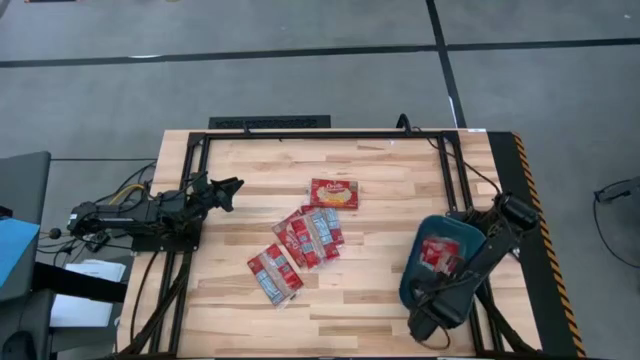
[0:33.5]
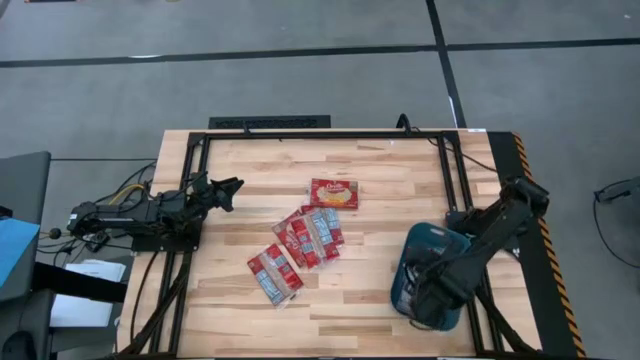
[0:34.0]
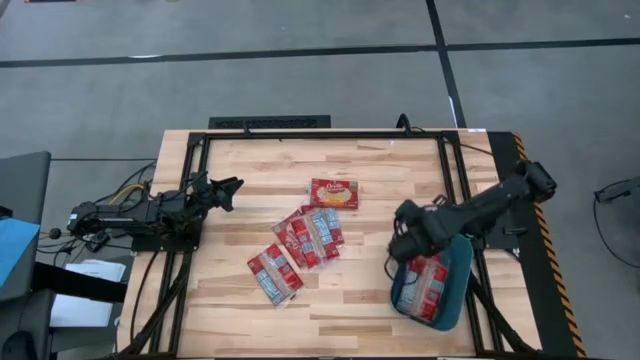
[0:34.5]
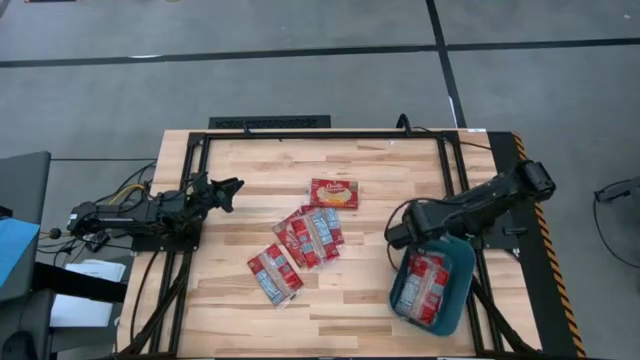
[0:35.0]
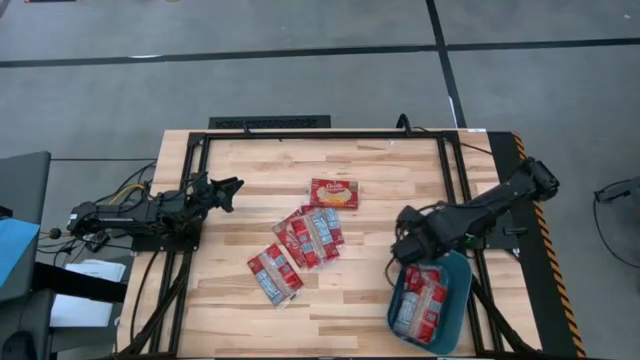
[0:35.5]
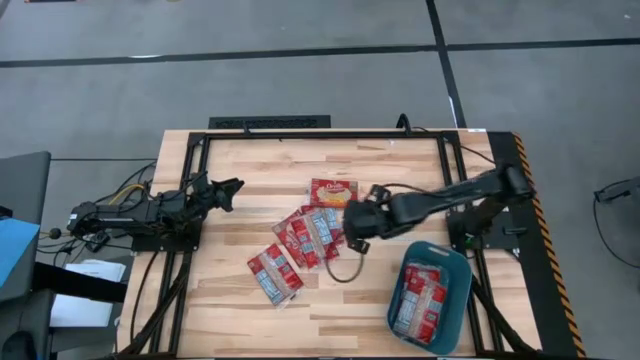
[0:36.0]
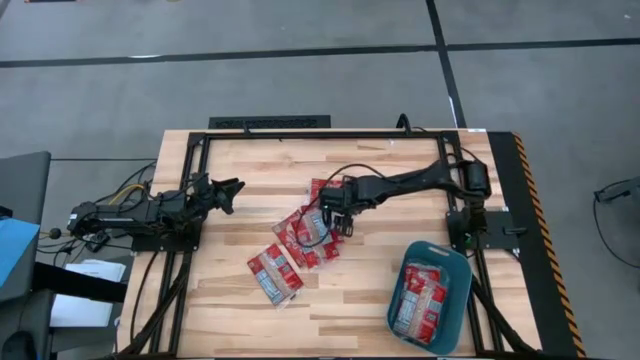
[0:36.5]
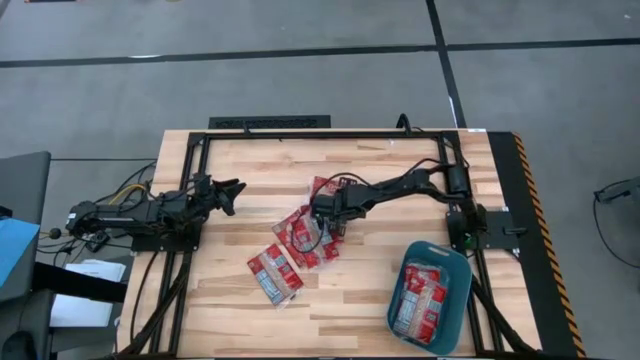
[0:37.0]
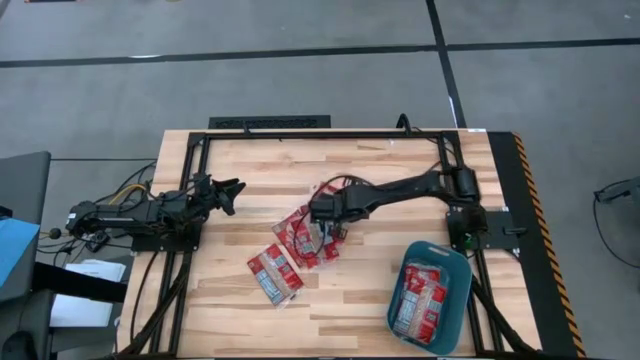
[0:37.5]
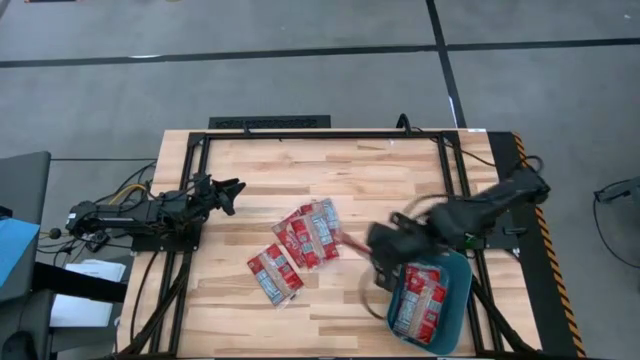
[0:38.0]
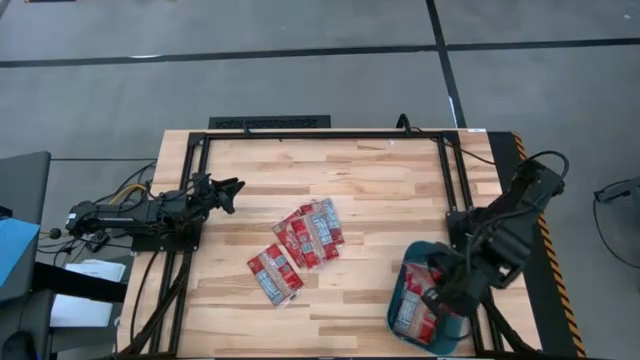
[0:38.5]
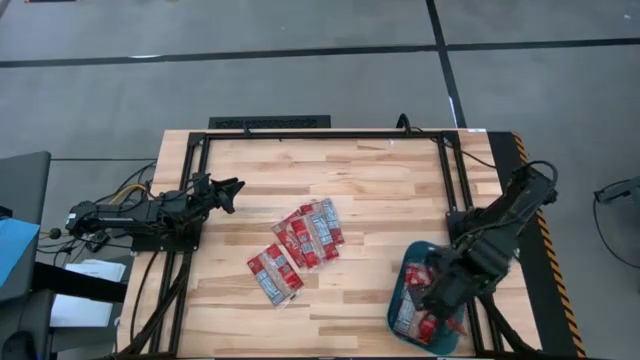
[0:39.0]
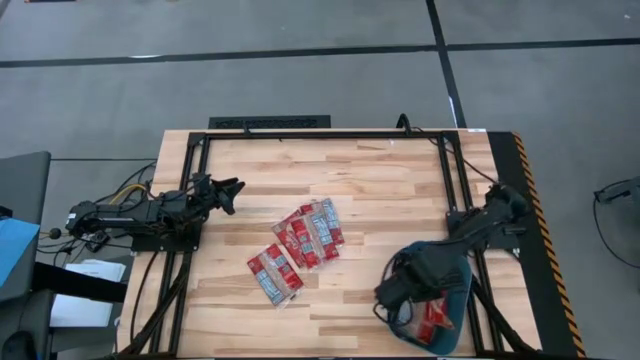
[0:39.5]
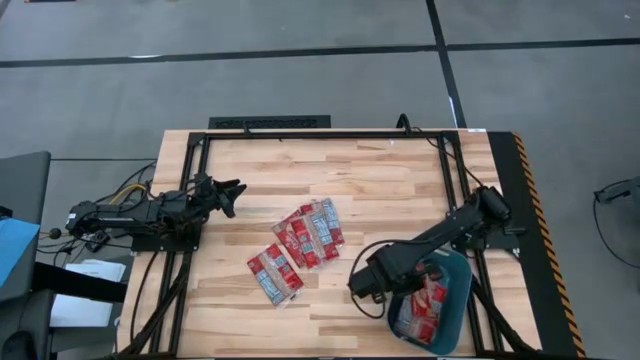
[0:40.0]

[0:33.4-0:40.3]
Task: Sort popcorn bags into baskets
Put the popcorn bag into the blue bin

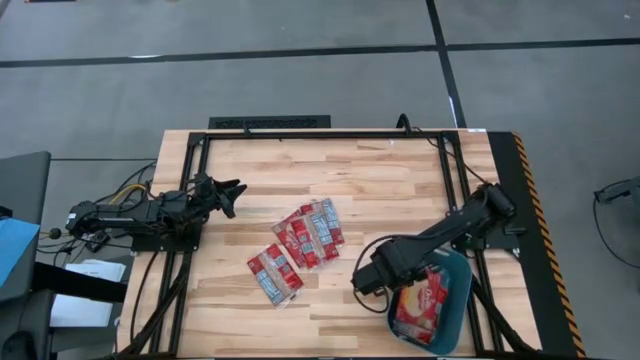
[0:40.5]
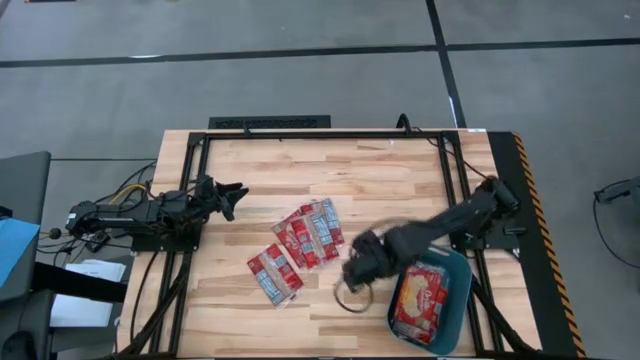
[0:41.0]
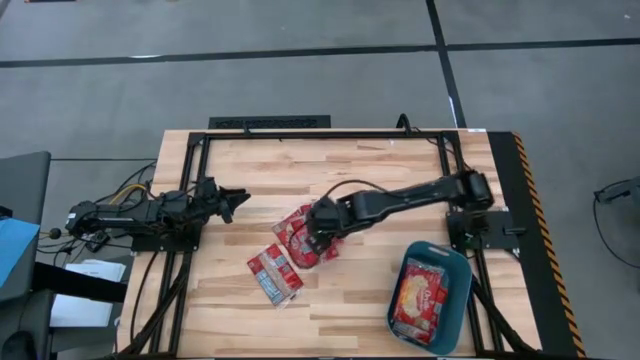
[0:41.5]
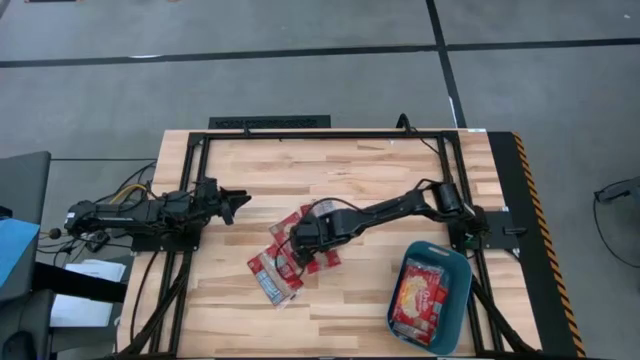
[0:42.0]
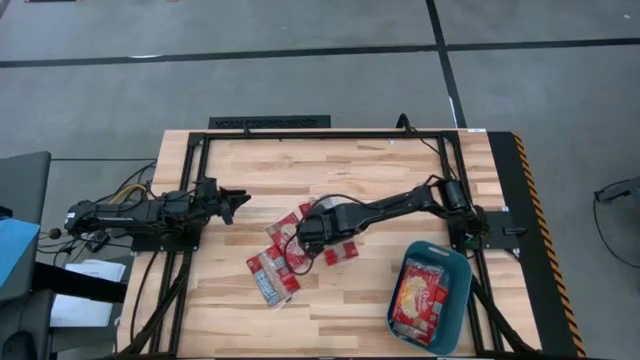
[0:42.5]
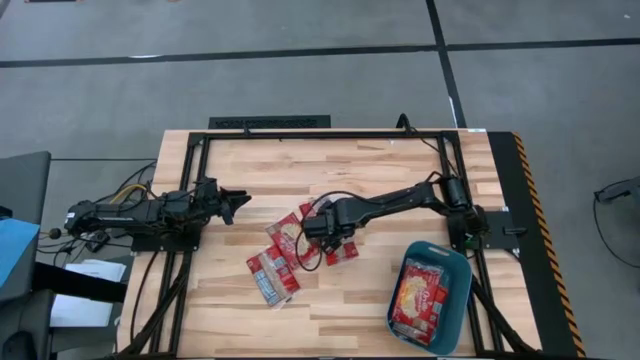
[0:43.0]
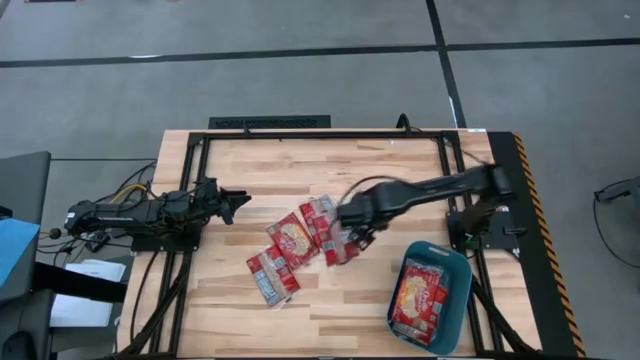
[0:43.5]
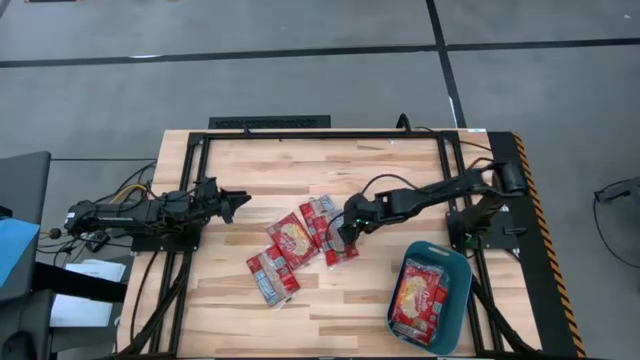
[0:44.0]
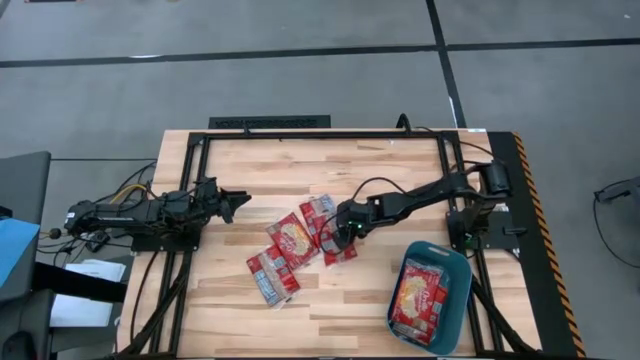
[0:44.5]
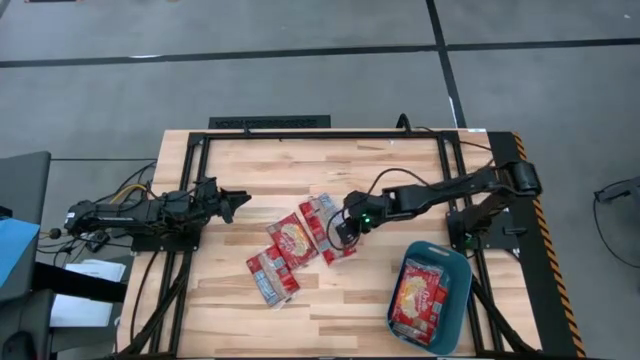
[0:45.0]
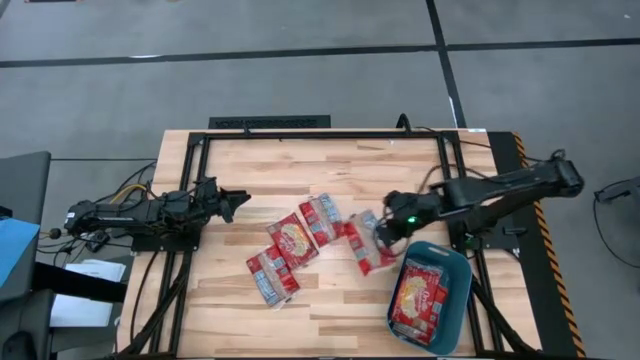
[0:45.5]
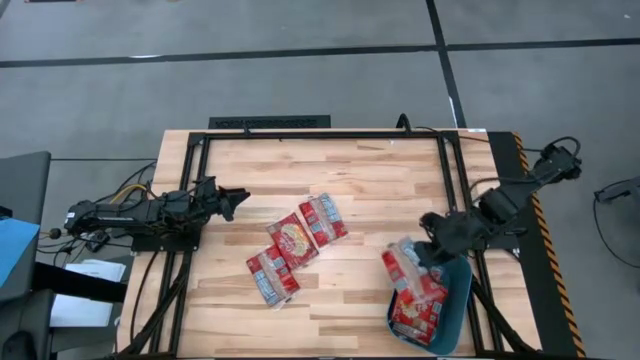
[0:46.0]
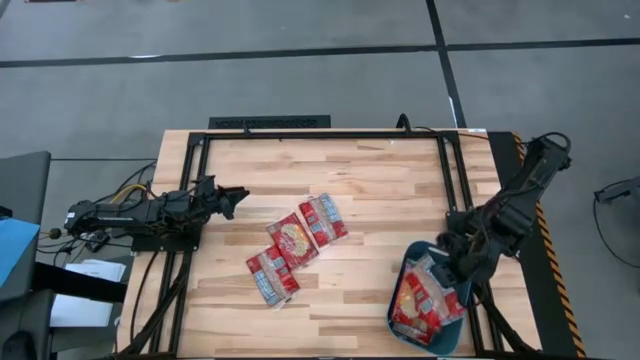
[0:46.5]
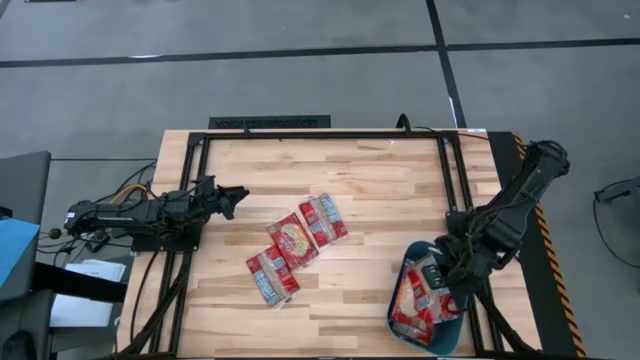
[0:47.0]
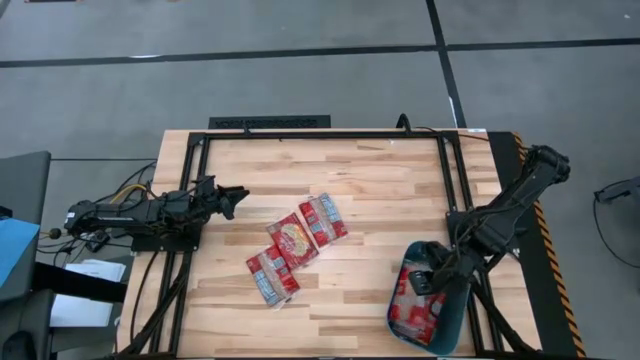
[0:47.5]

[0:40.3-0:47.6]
Put the popcorn bag into the blue bin

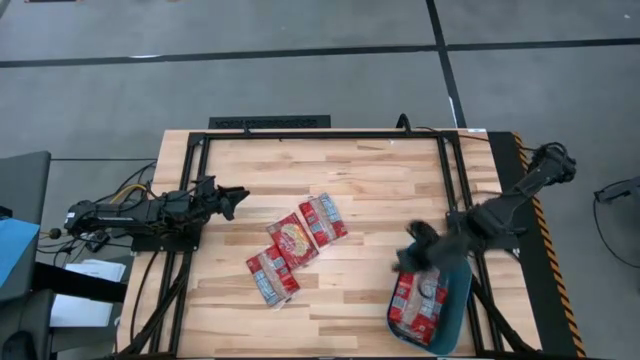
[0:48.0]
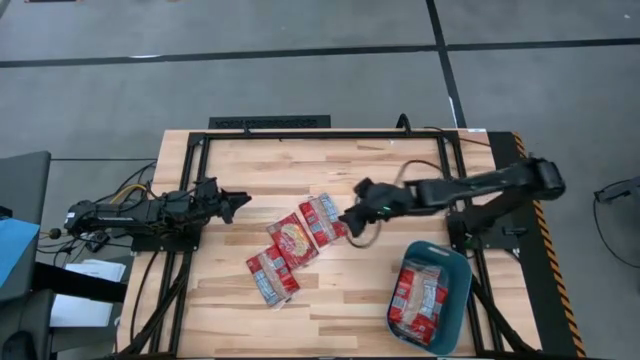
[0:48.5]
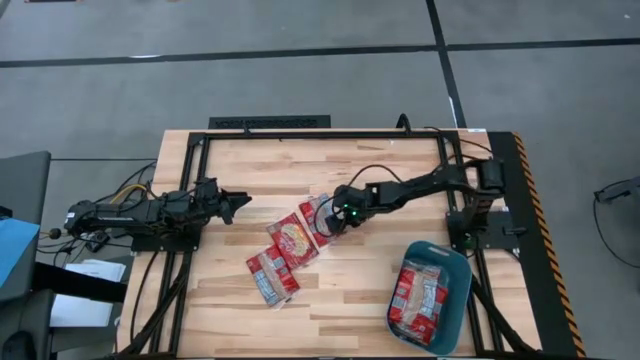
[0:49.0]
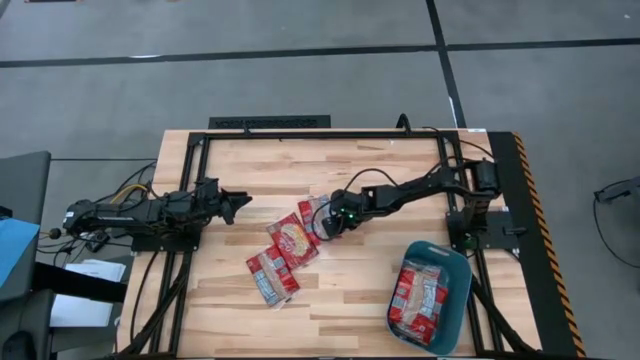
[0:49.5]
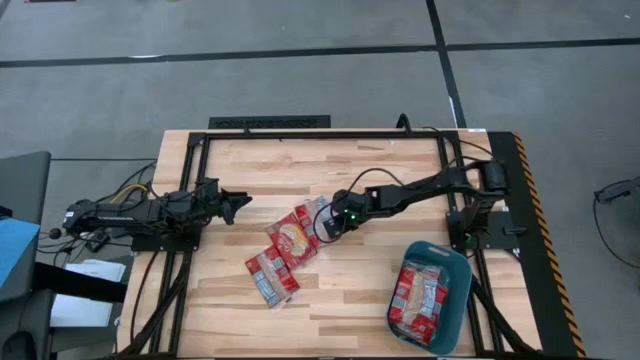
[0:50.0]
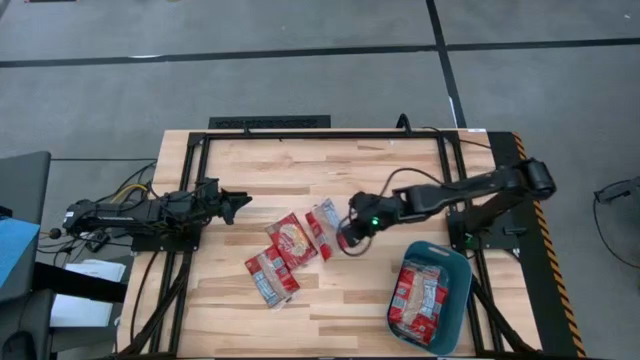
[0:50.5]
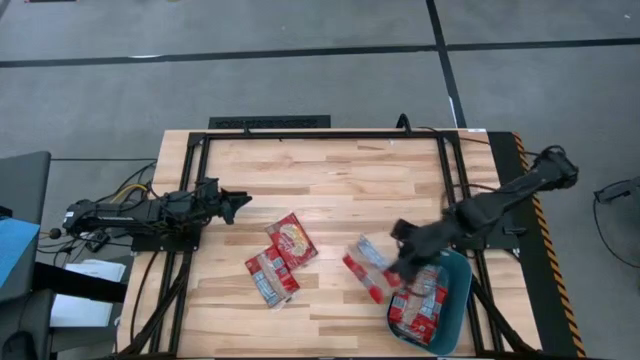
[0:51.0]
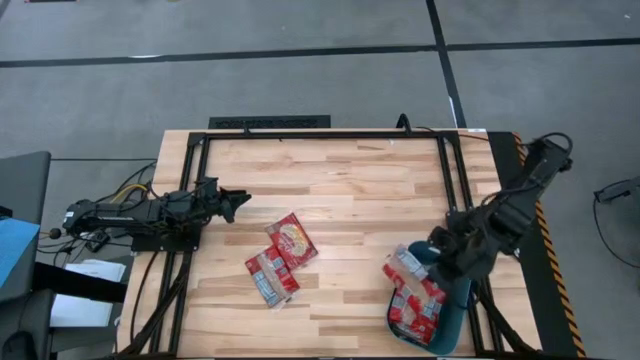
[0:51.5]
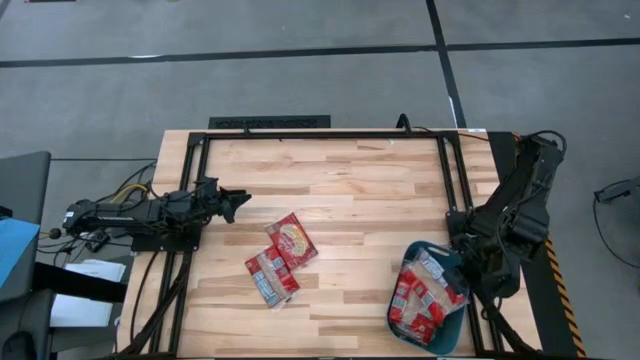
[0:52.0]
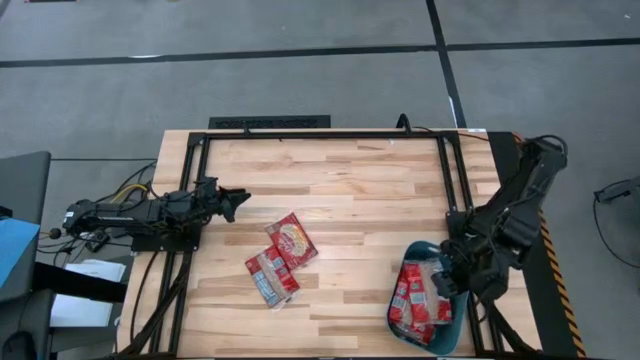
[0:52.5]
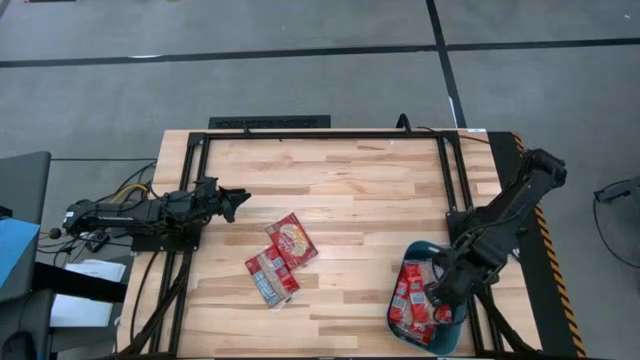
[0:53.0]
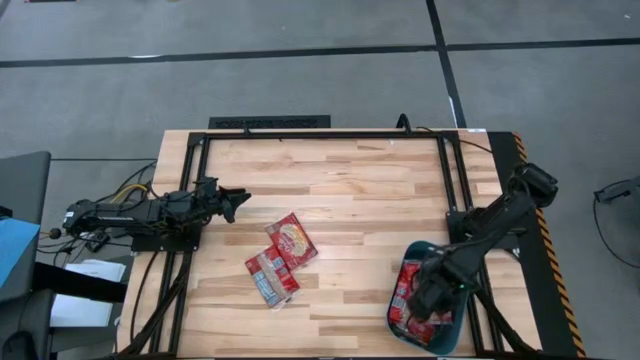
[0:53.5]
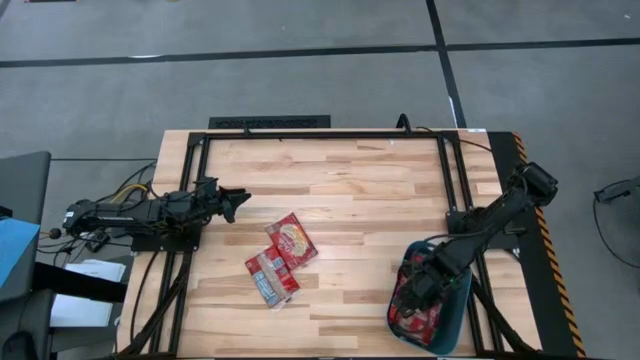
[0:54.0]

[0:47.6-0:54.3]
Put the popcorn bag into the blue bin
